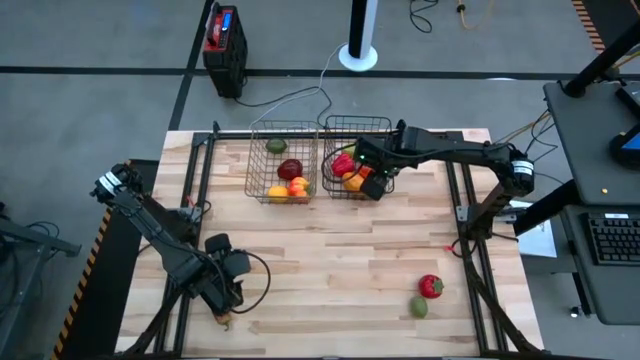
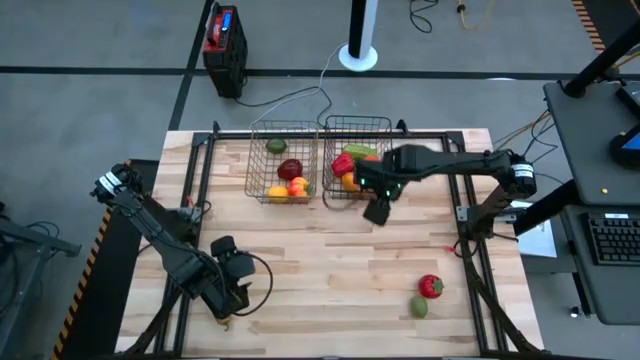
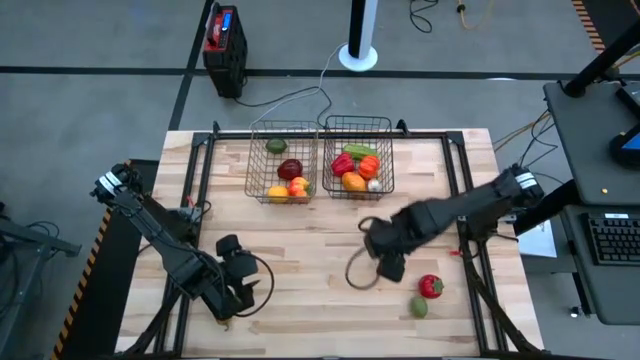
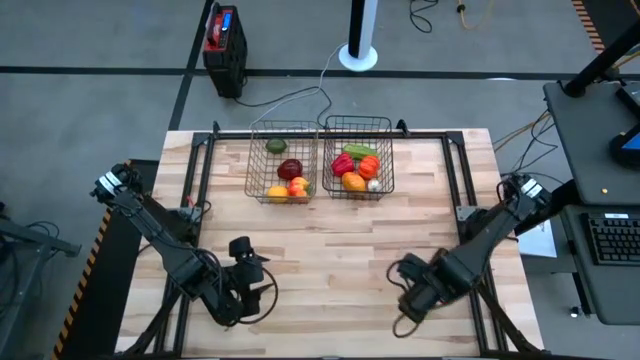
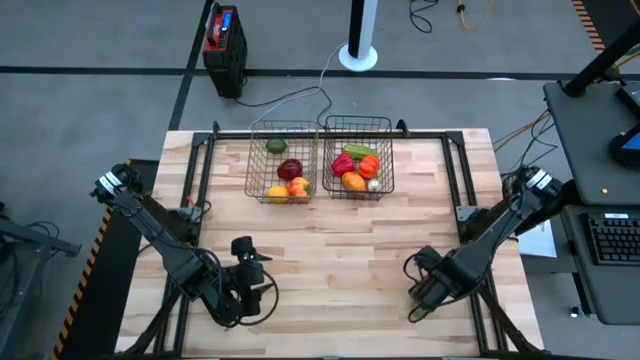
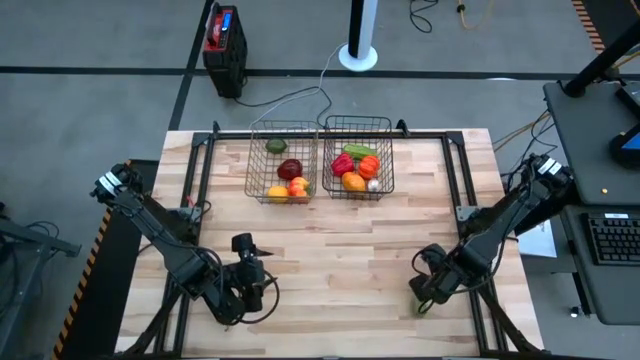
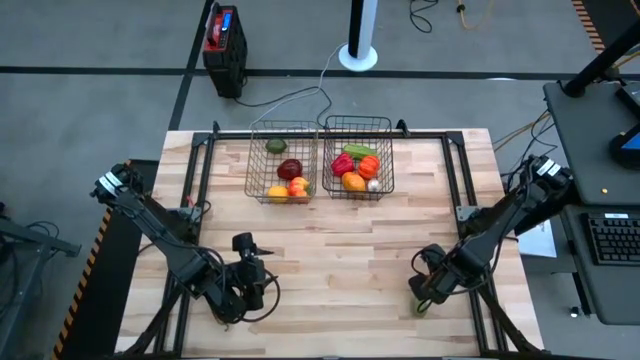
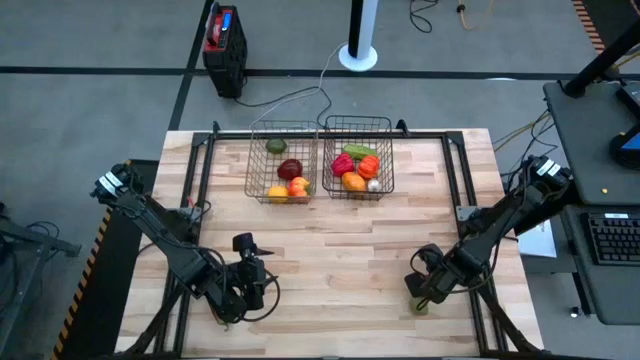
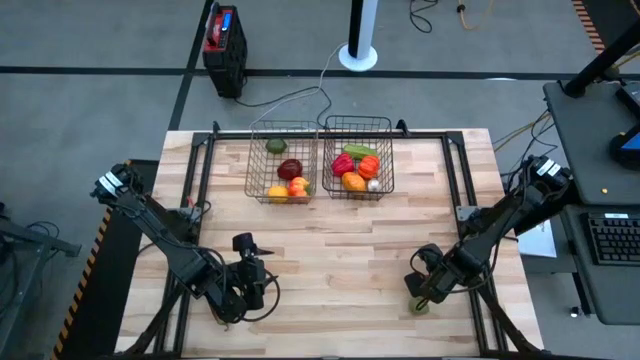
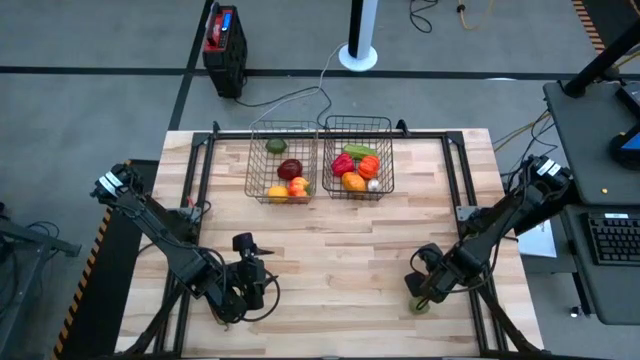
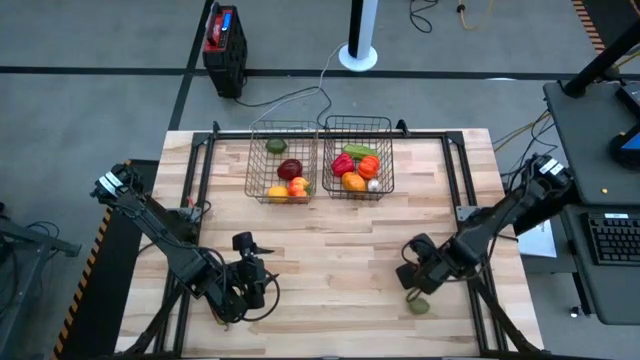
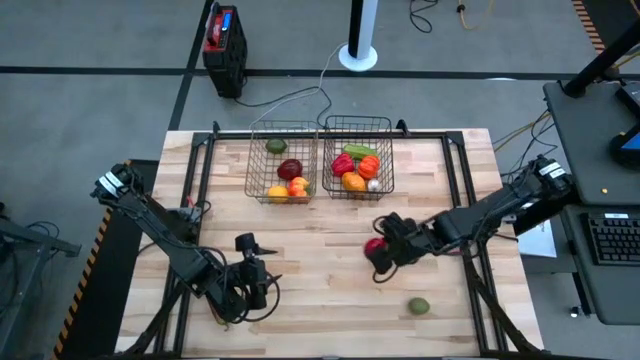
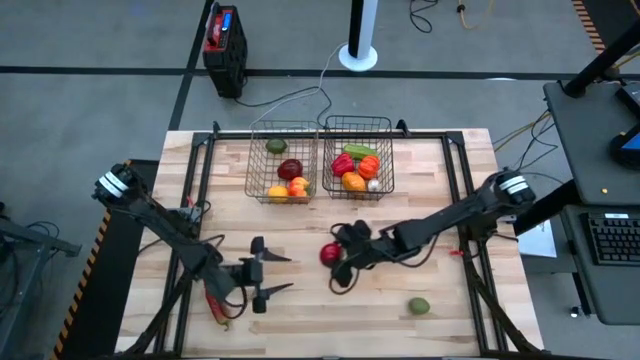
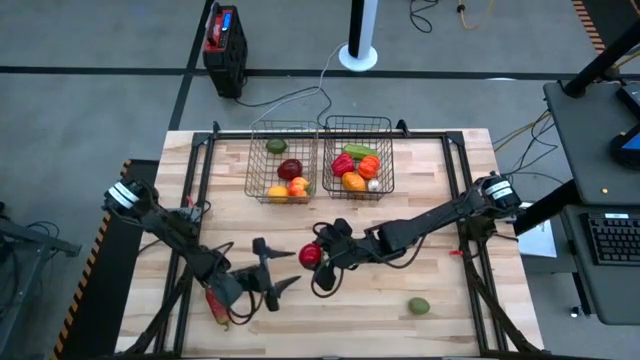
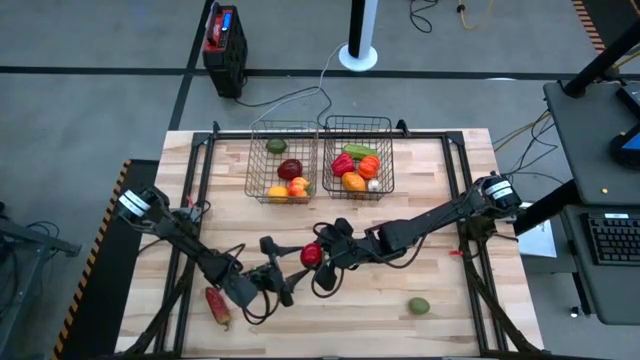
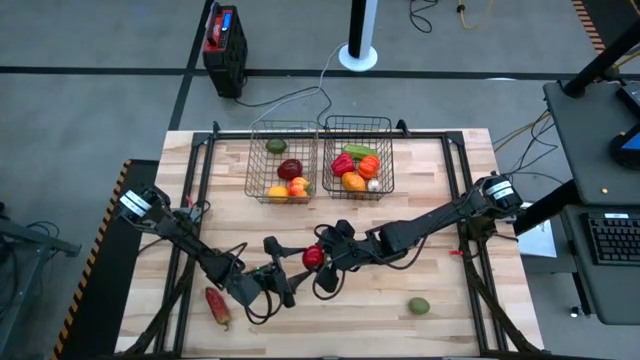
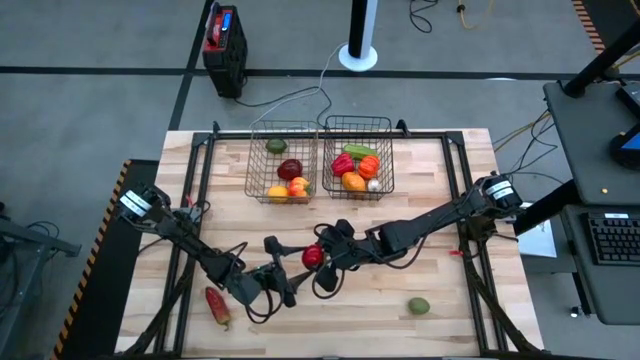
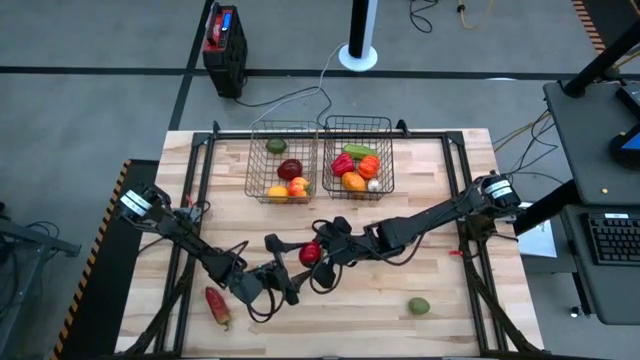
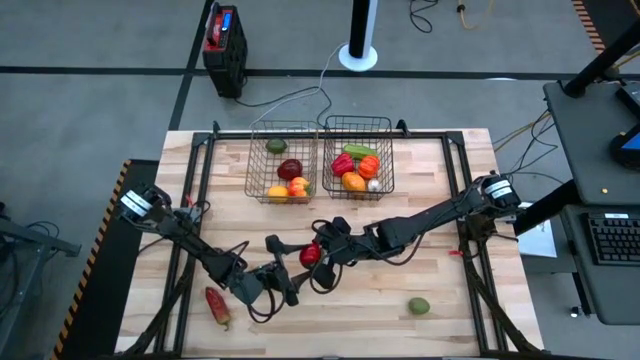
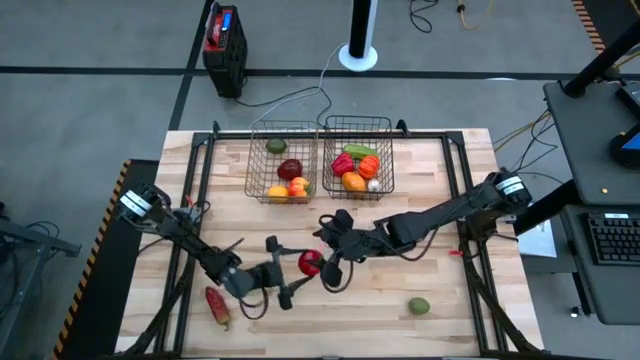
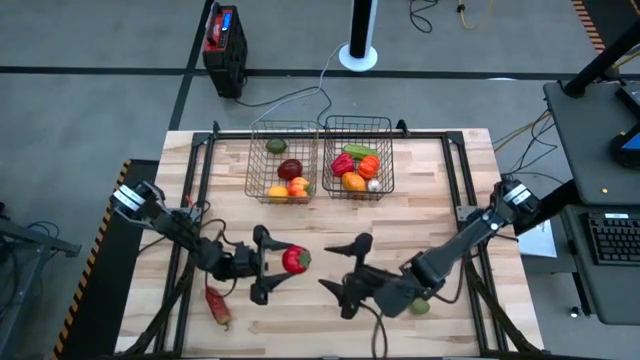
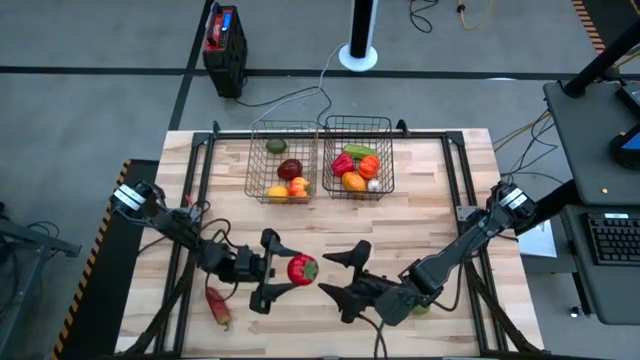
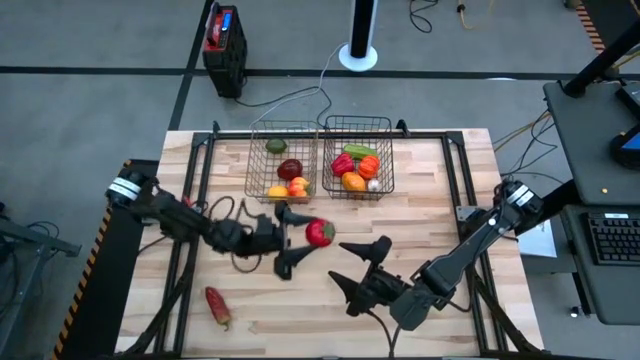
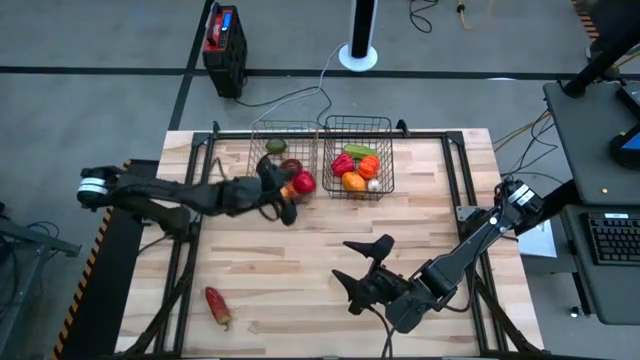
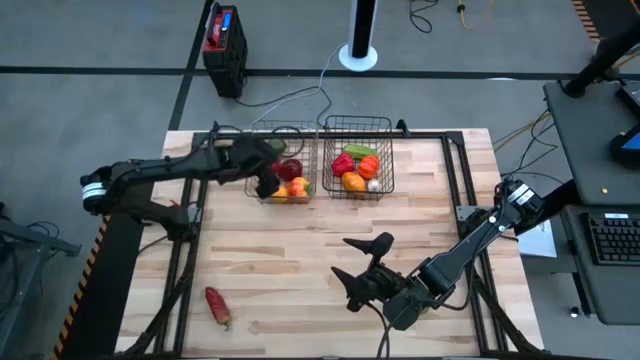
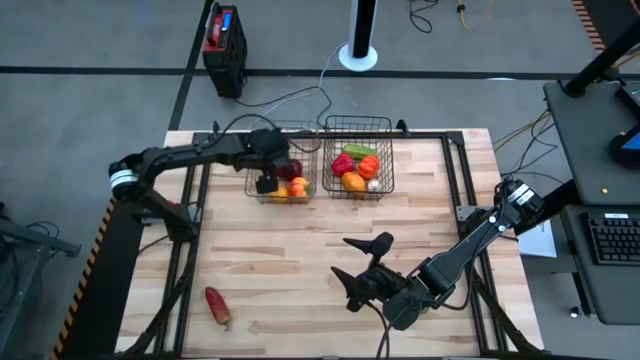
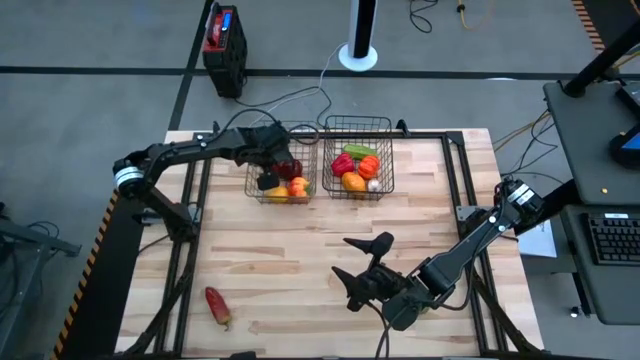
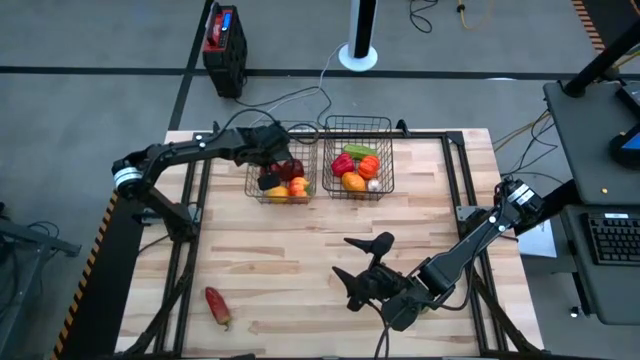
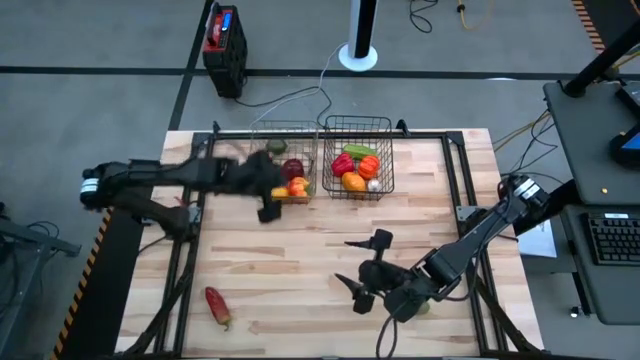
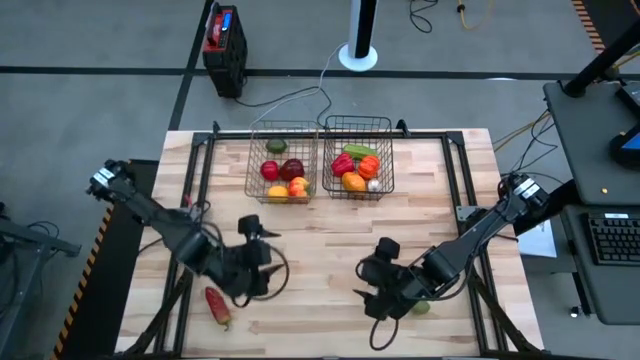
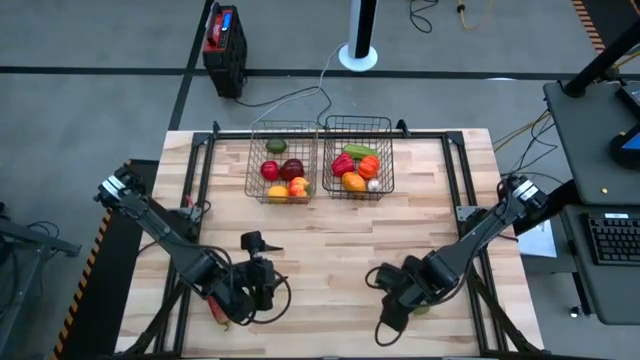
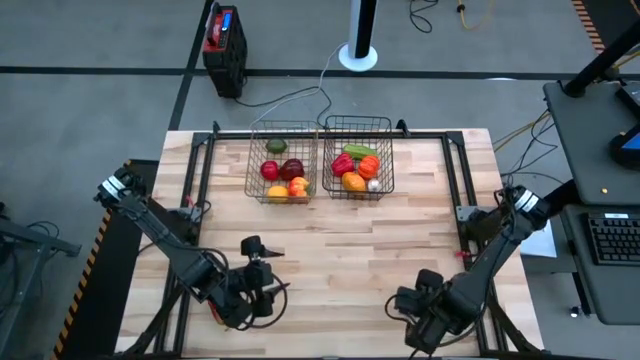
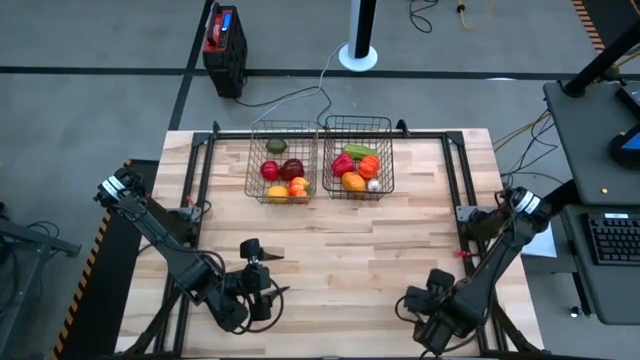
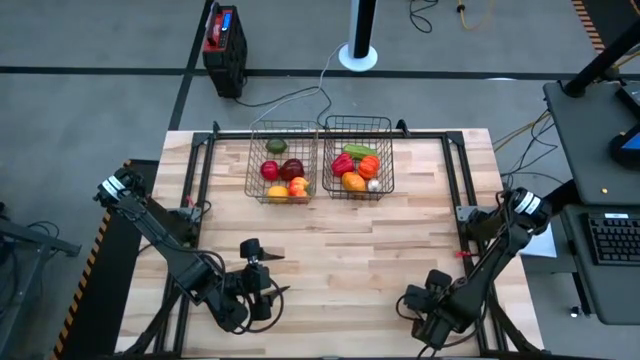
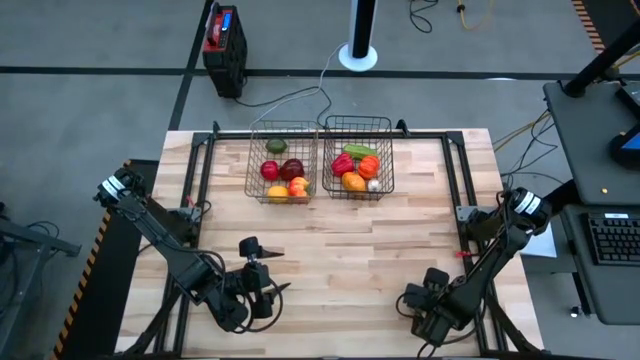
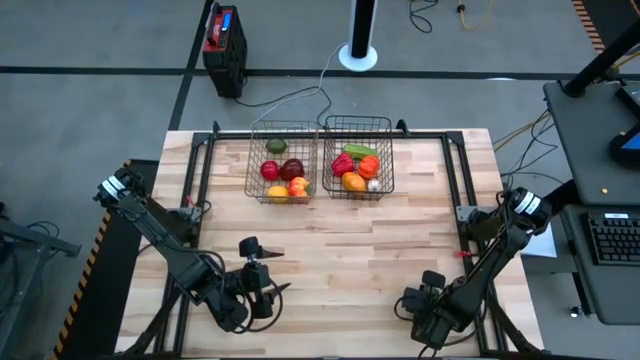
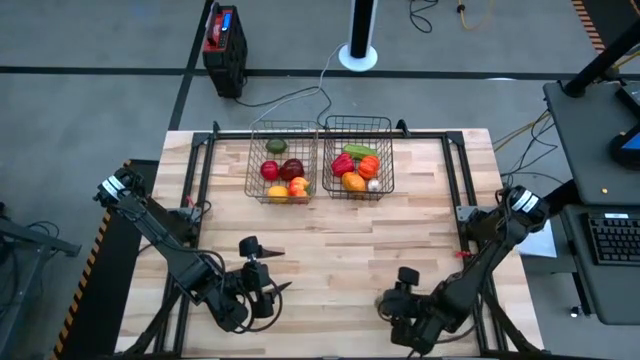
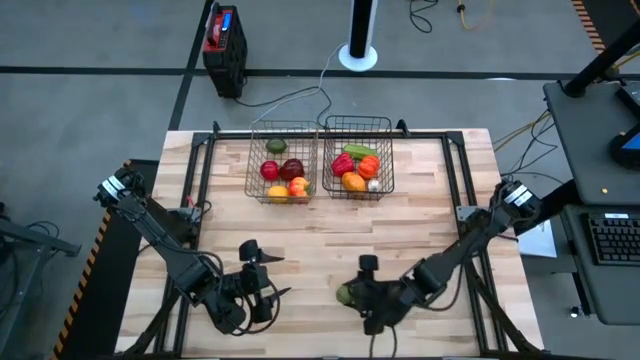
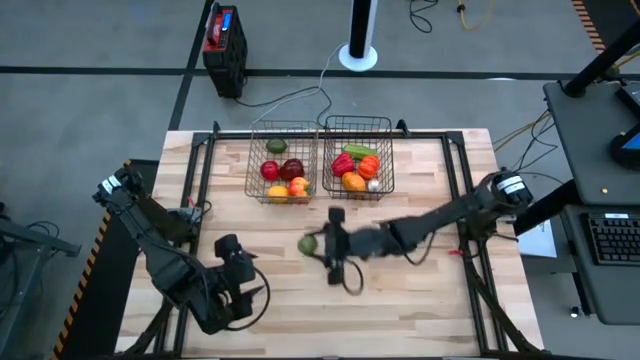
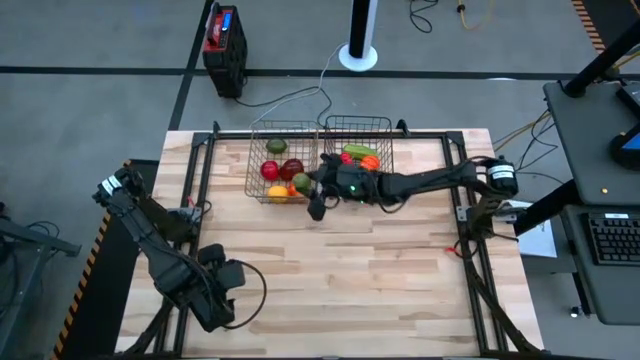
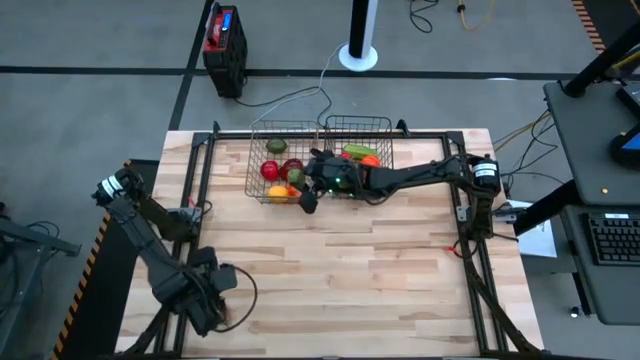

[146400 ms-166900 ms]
Task: Sort produce into baskets
Put the red tomato into the silver wire basket

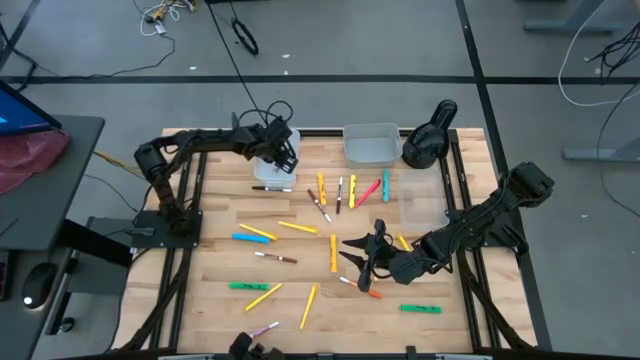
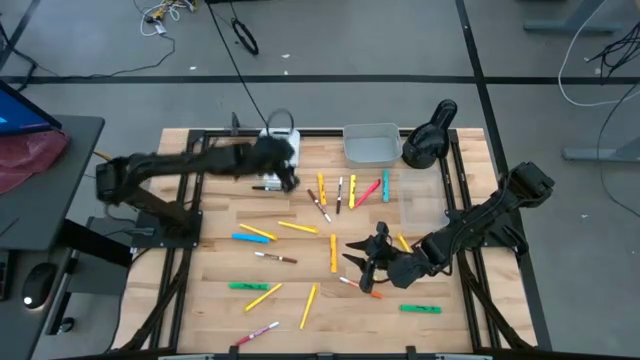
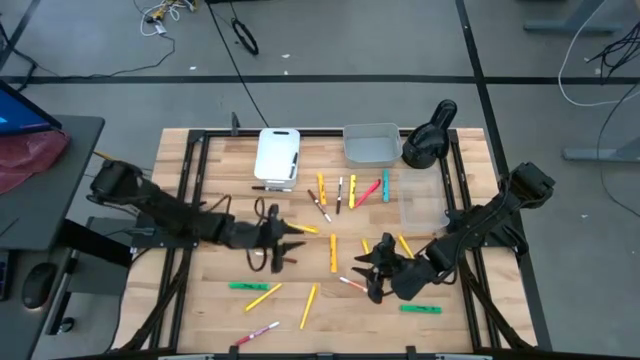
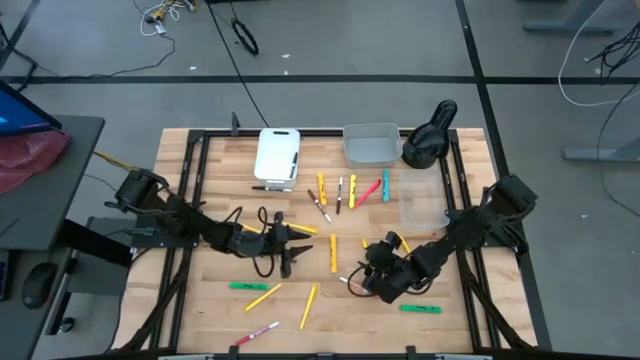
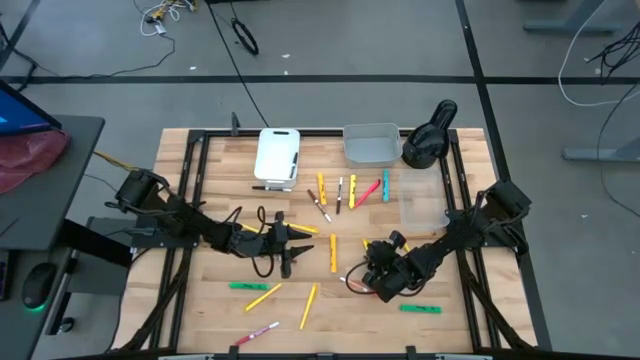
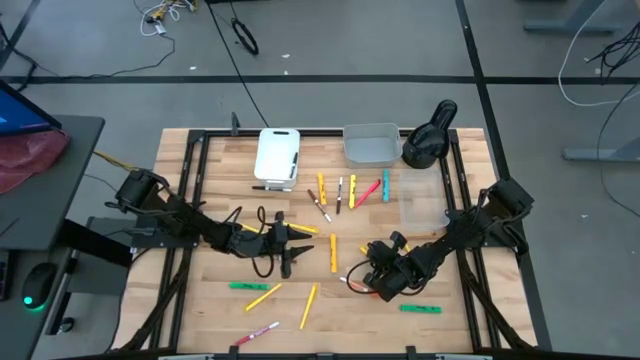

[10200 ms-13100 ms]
Task: Pick & Place Markers
Put the yellow pen into the transparent bin
